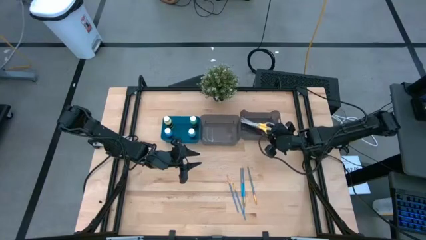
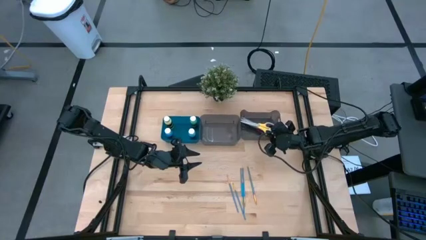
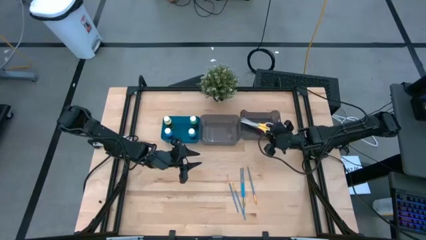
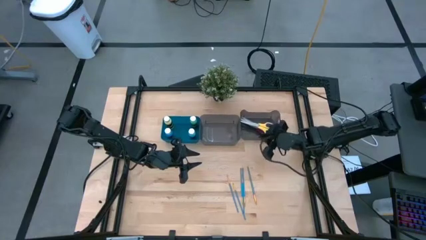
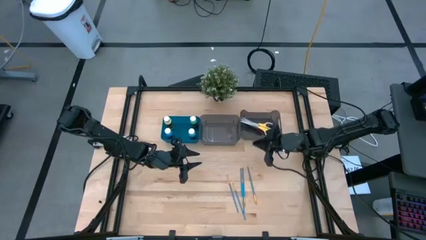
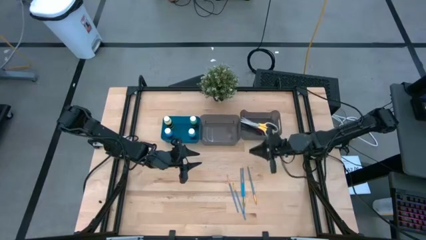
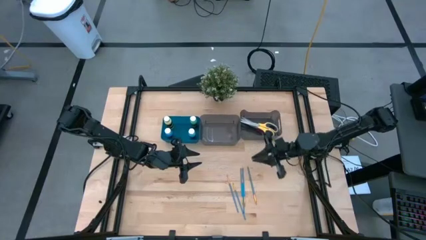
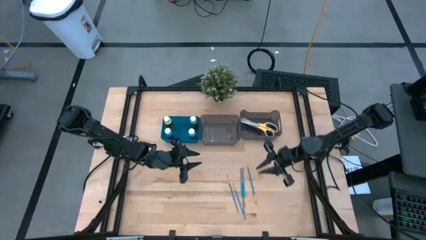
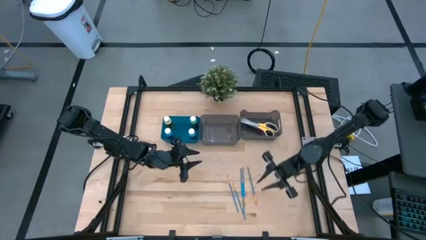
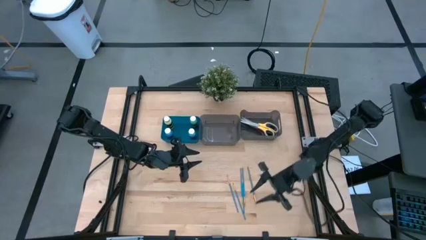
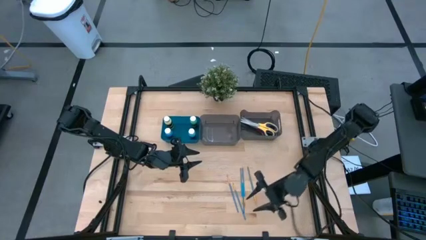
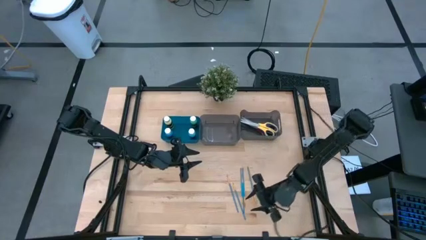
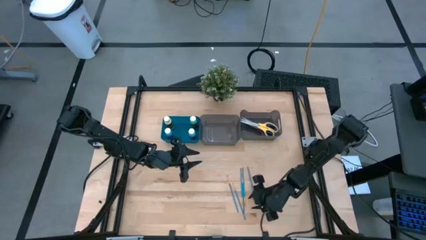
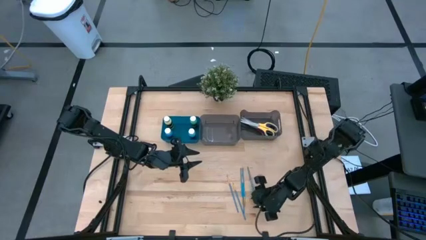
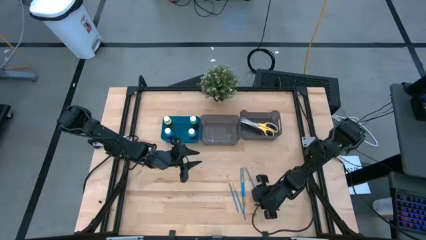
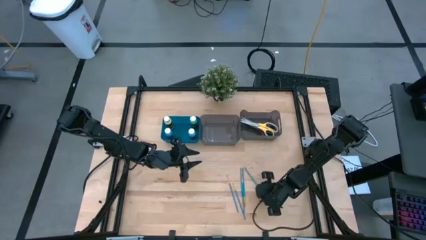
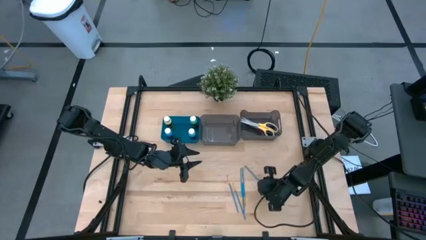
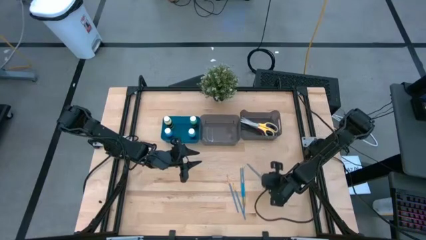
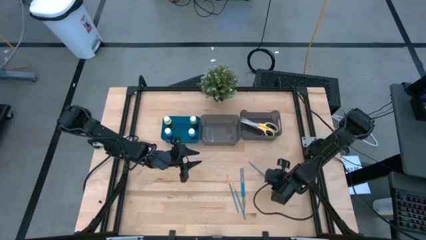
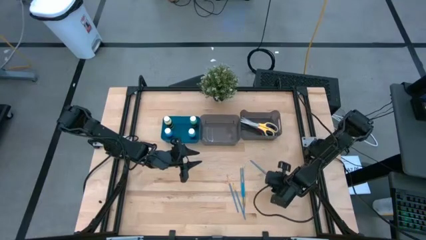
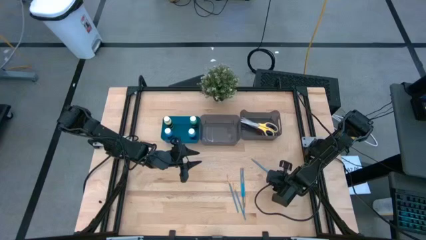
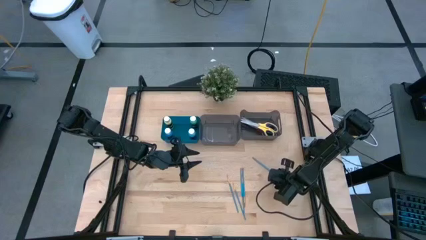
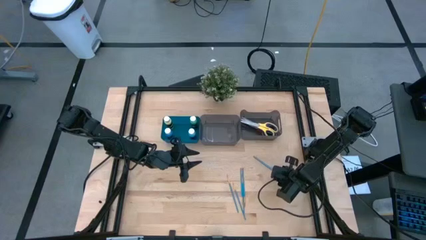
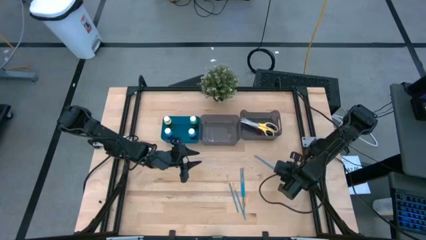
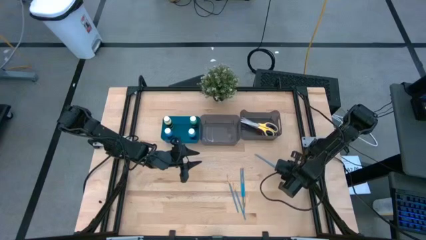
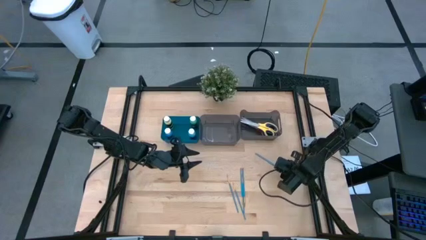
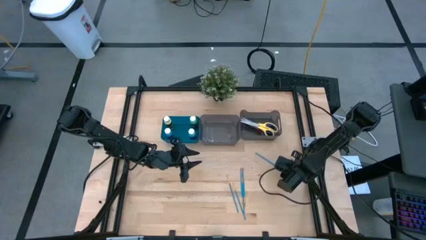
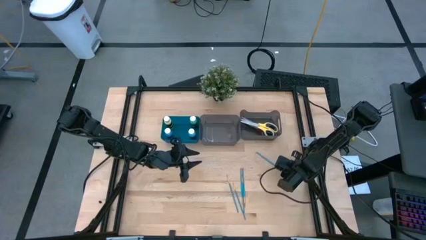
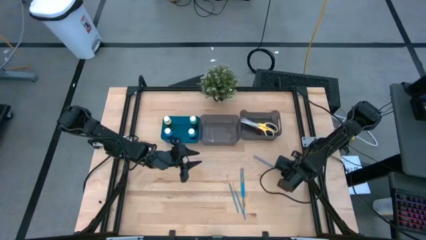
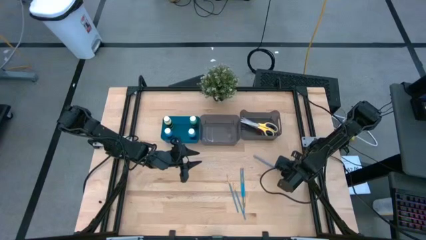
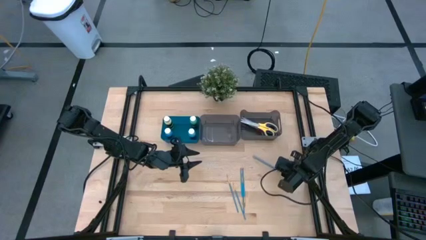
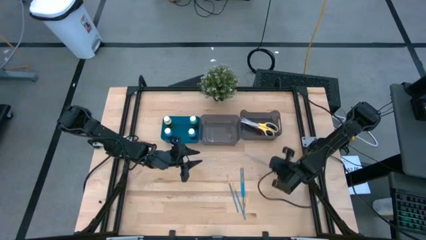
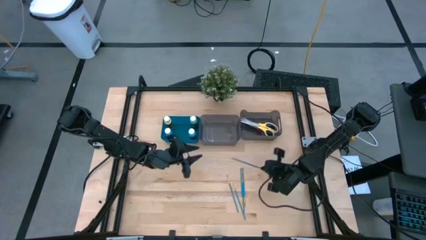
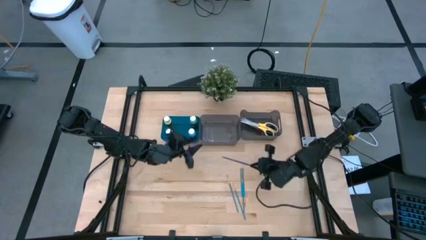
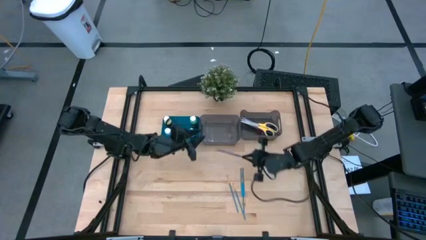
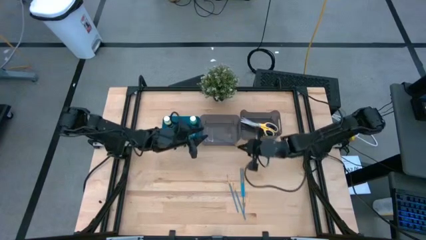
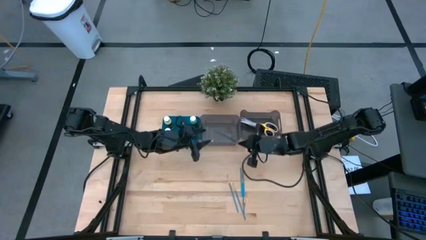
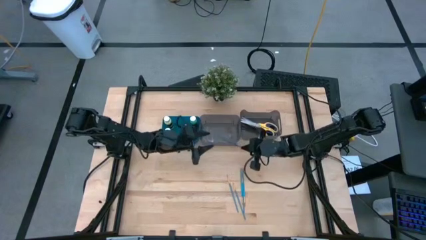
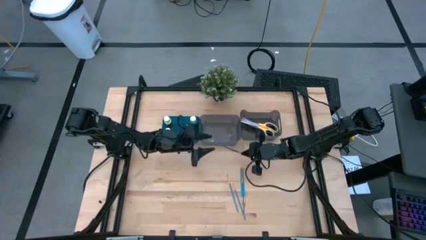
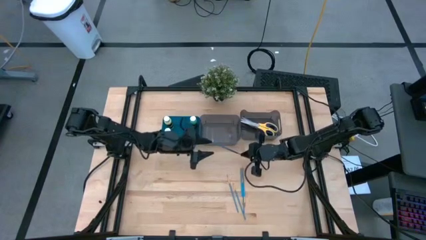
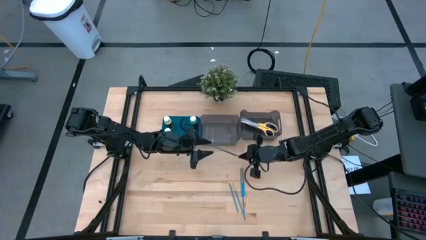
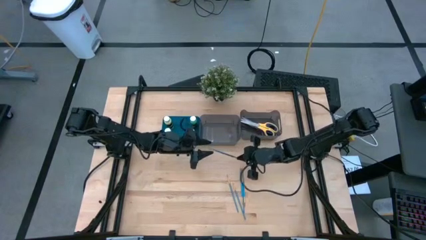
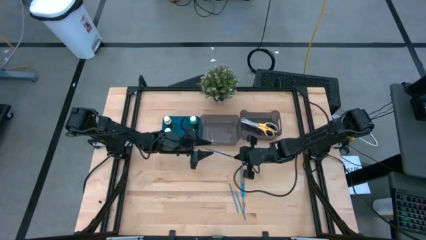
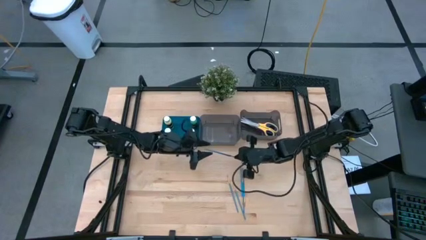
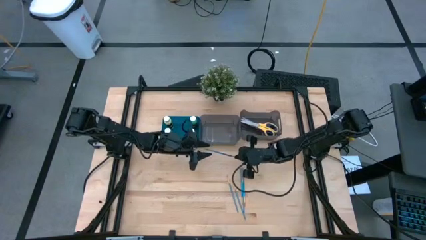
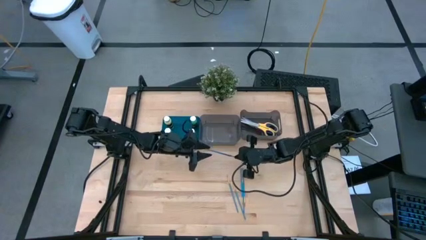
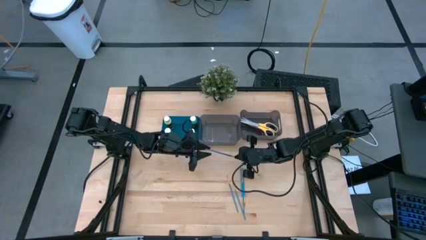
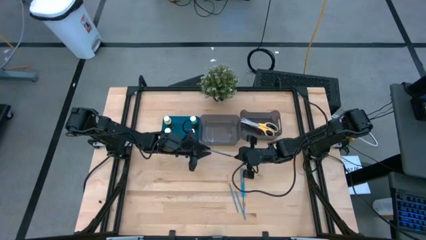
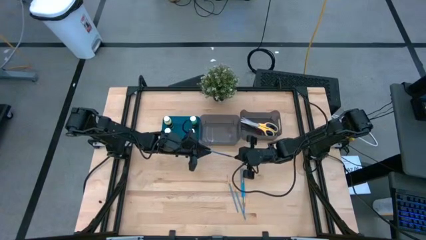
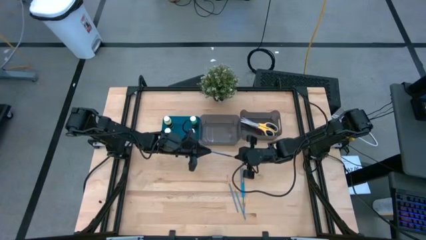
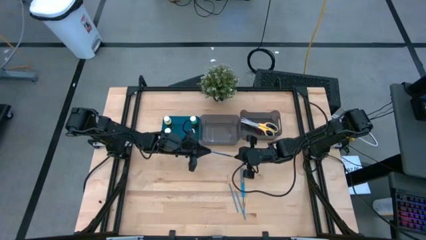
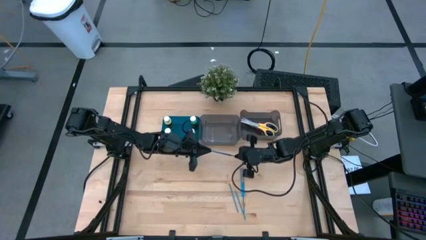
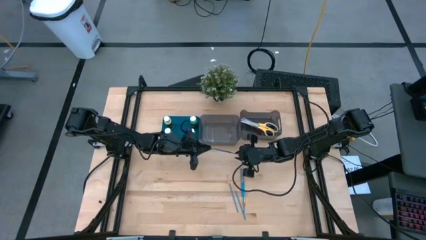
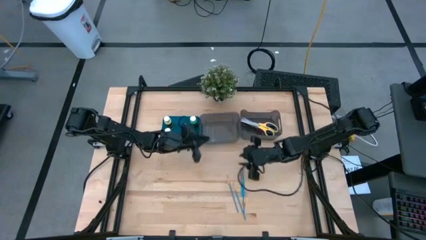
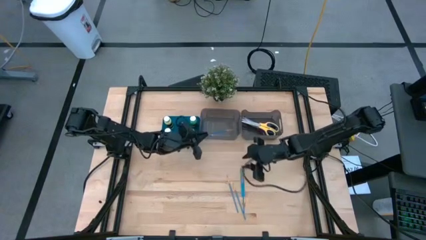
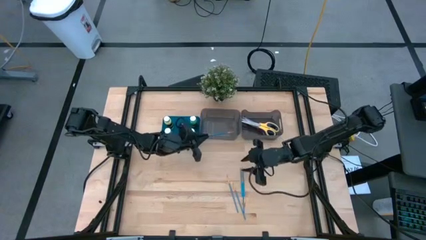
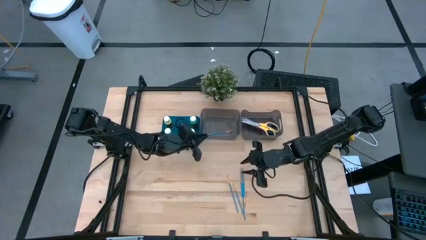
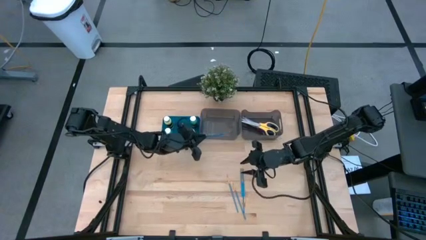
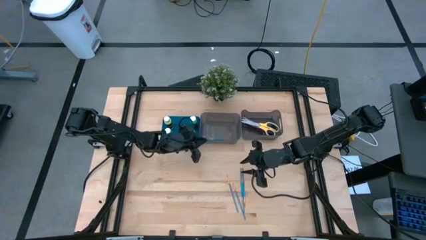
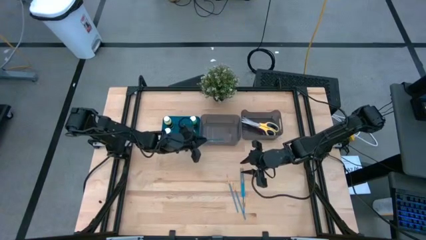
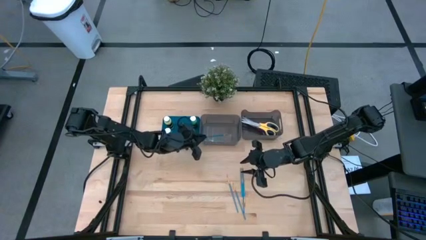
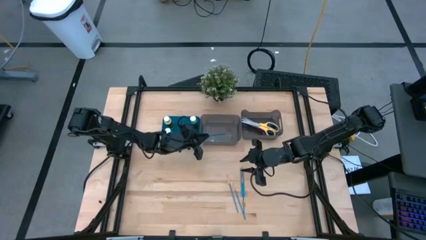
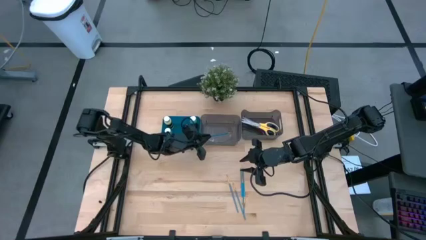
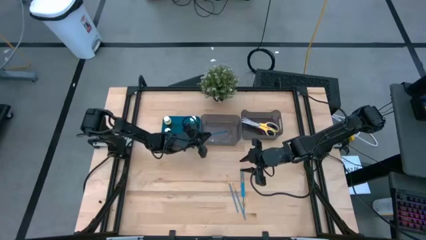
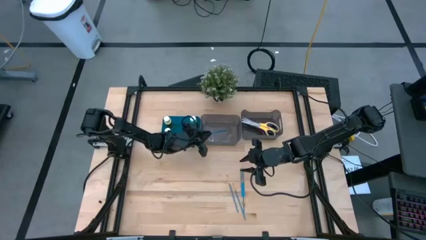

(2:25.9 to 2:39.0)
Task: Pick & Place Paint Supplies
Put the paint brush into the left black bin
